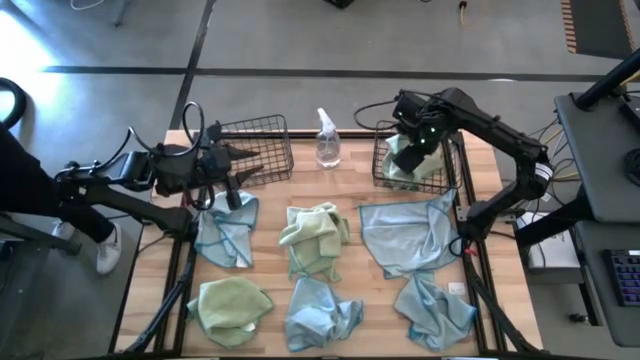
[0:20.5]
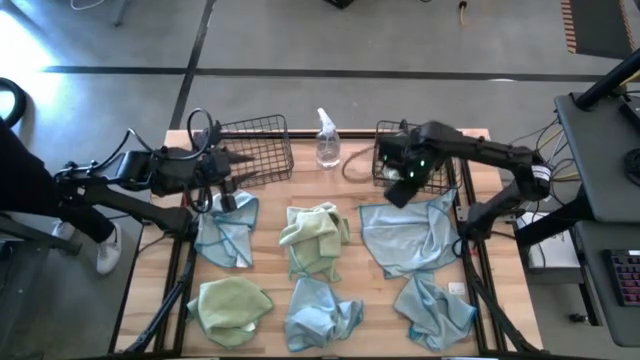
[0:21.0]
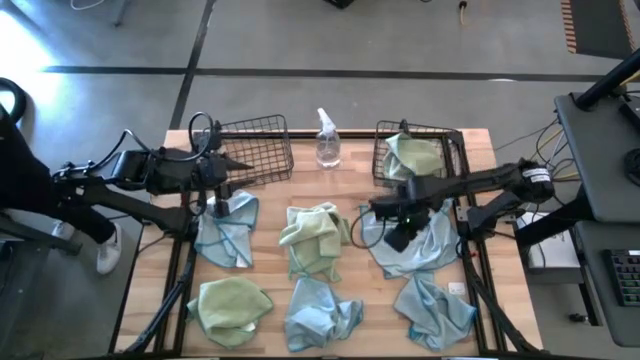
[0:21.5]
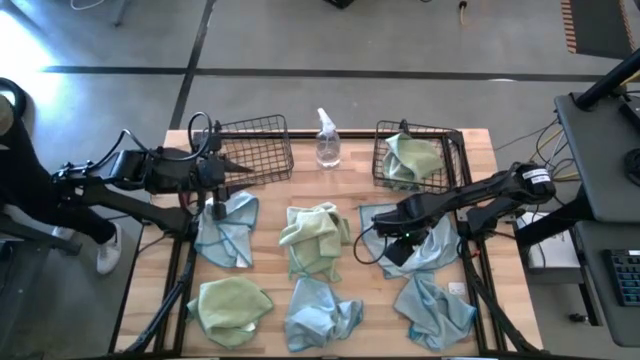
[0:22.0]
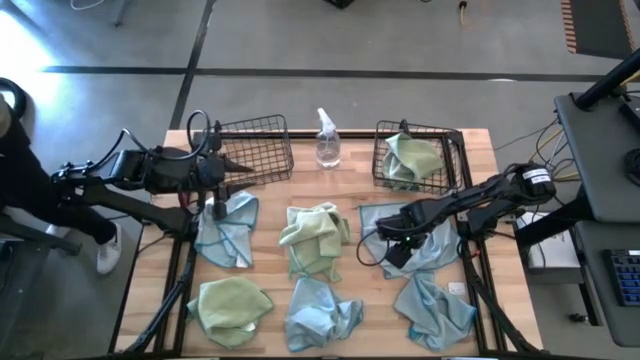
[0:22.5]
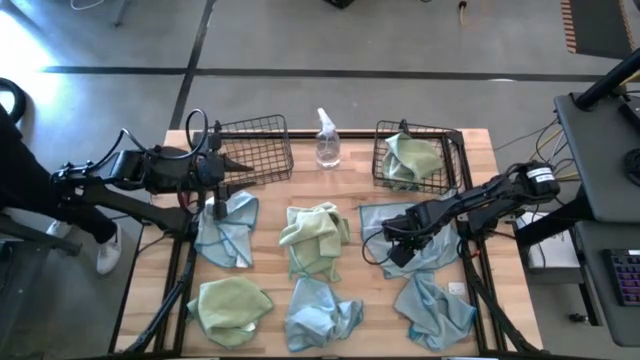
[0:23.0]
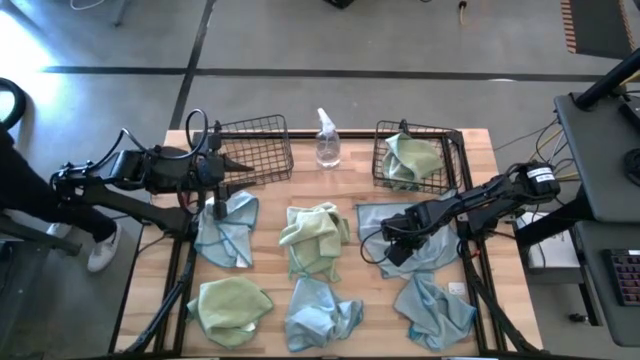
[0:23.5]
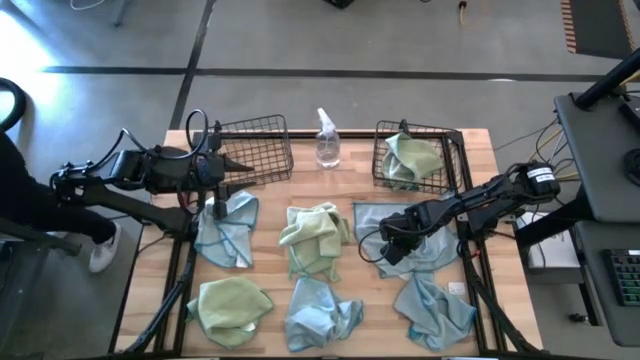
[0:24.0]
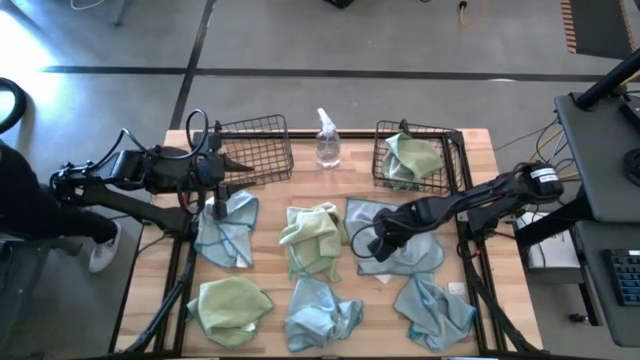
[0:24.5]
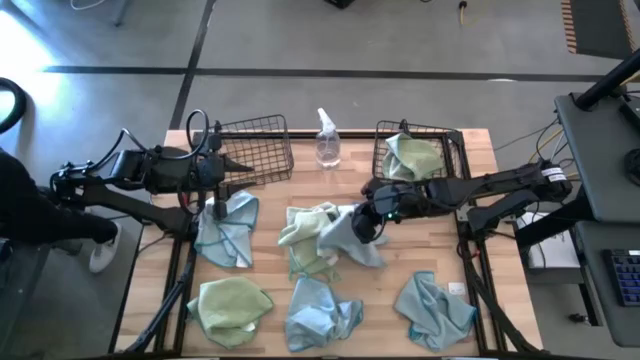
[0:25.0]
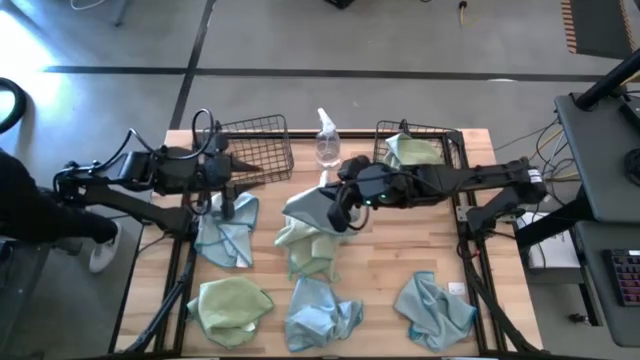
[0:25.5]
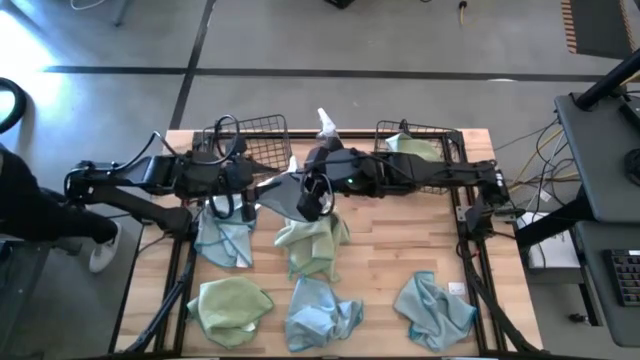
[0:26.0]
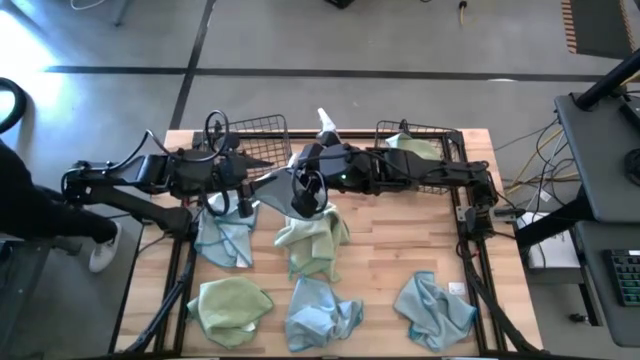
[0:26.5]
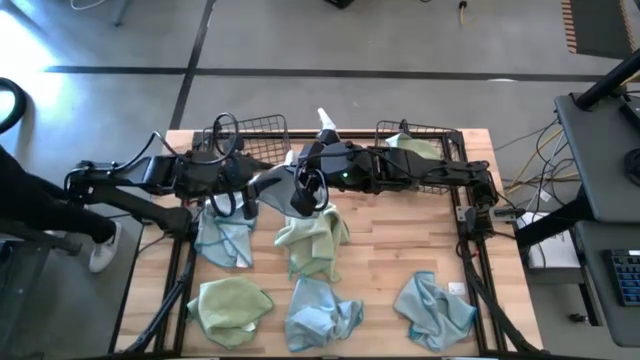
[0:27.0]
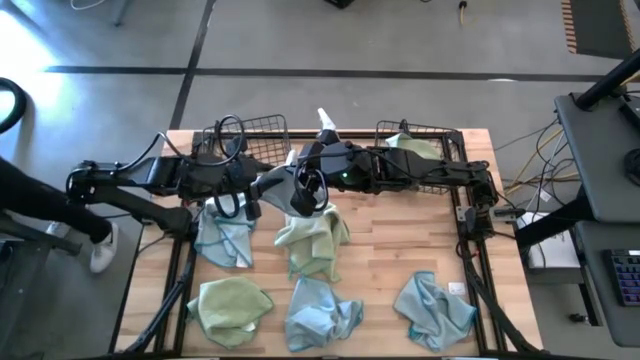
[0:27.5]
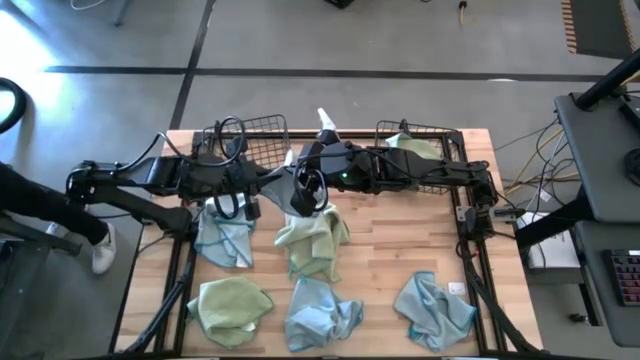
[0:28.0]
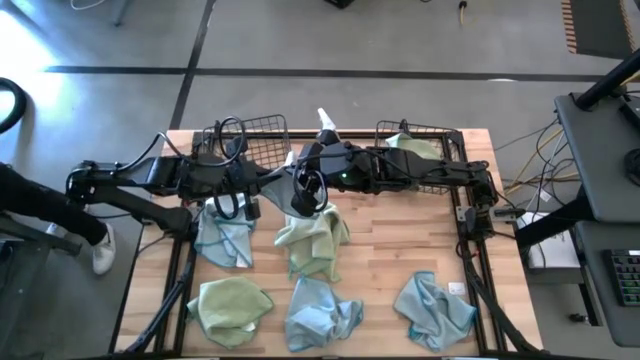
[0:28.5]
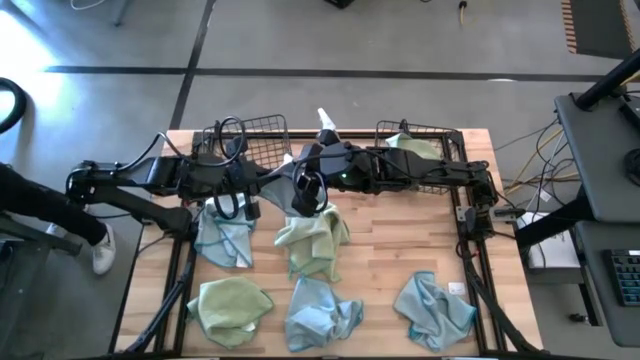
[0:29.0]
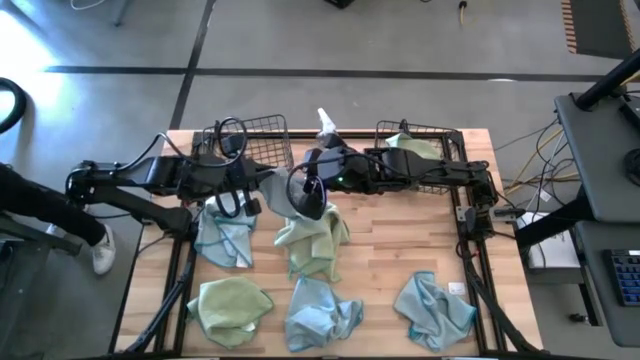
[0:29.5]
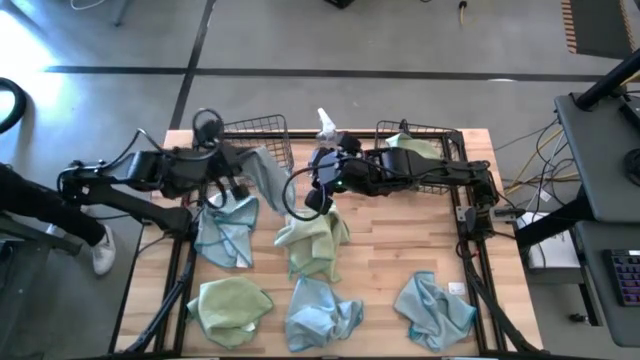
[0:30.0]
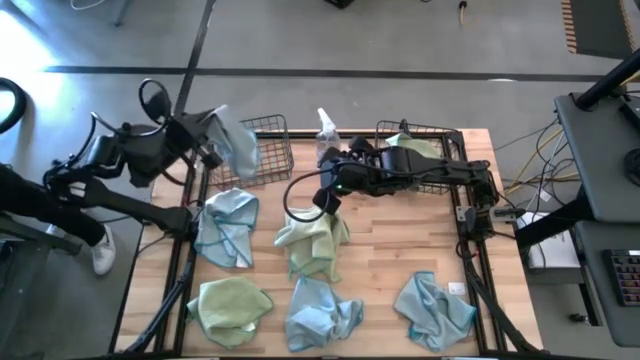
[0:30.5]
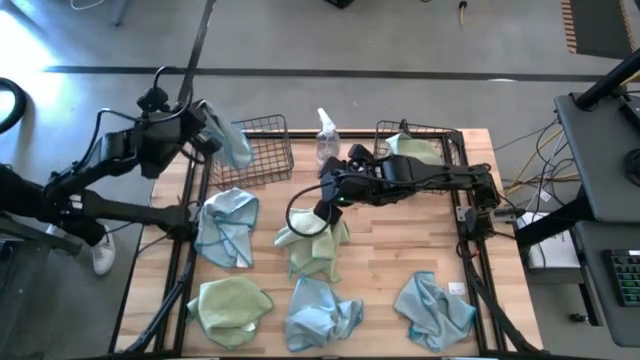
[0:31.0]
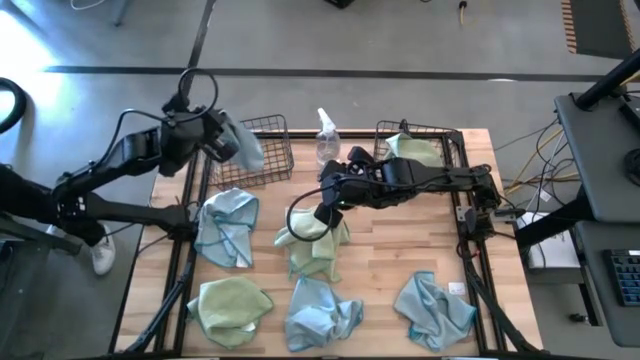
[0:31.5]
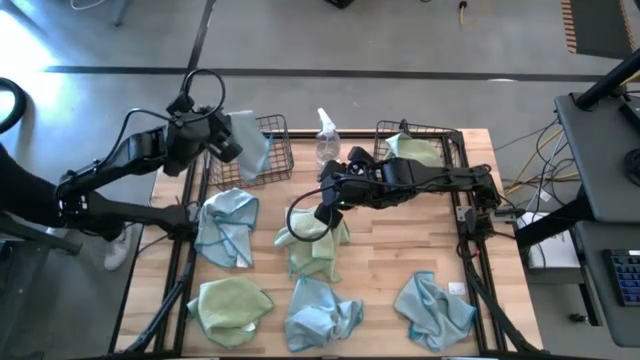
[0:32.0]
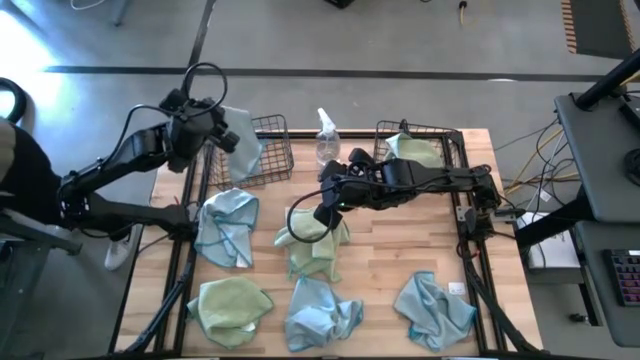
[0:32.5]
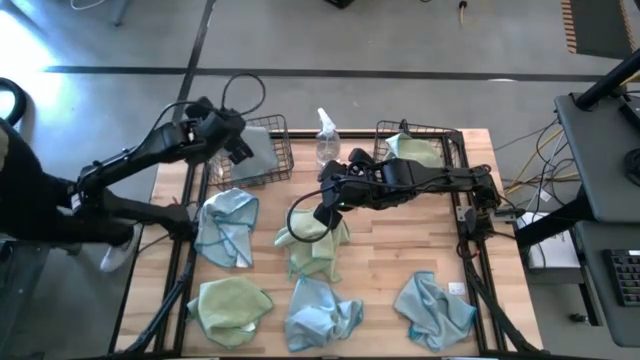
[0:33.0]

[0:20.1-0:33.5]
Task: Sort microfiber towel by color & place in baskets
Put the blue microfiber cloth into the left wire basket
